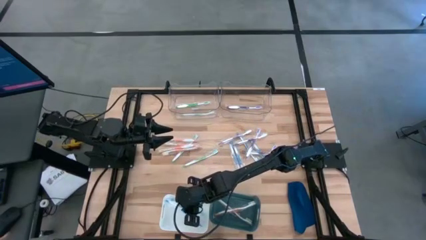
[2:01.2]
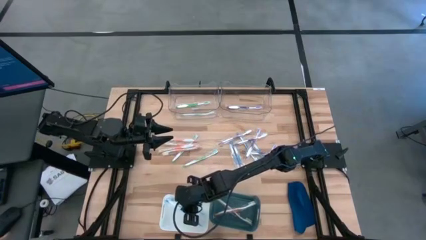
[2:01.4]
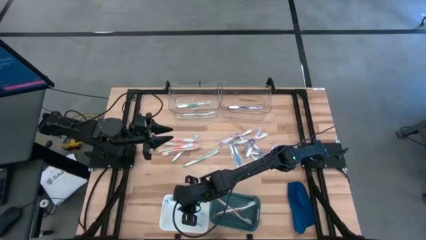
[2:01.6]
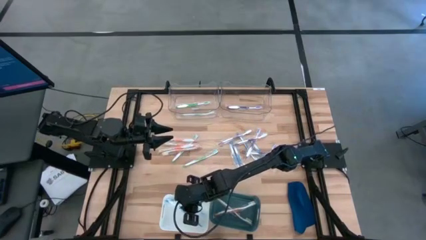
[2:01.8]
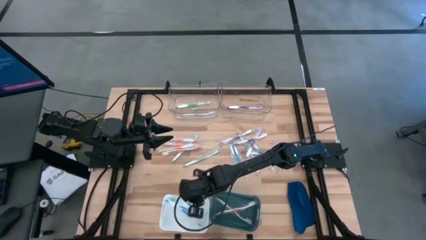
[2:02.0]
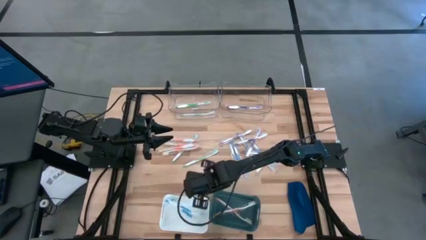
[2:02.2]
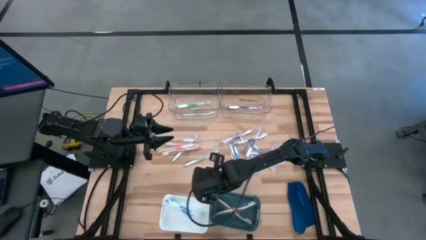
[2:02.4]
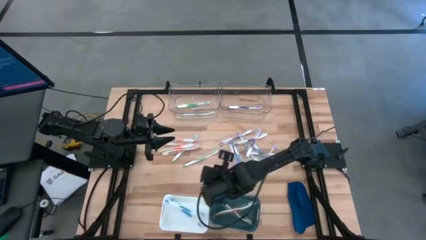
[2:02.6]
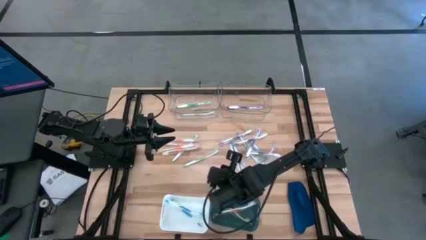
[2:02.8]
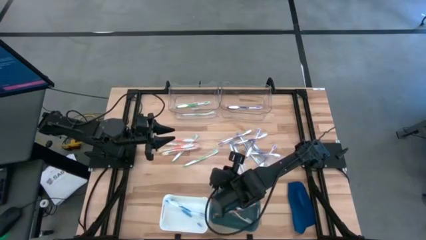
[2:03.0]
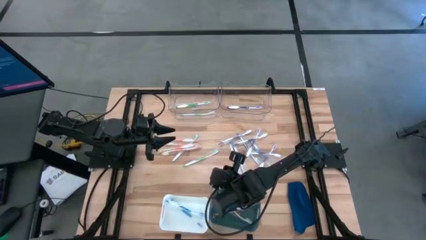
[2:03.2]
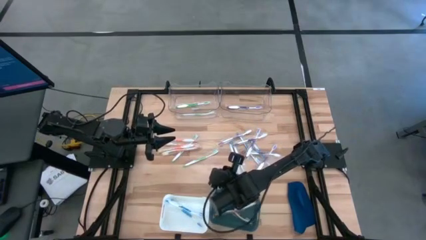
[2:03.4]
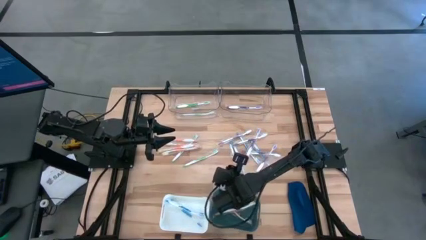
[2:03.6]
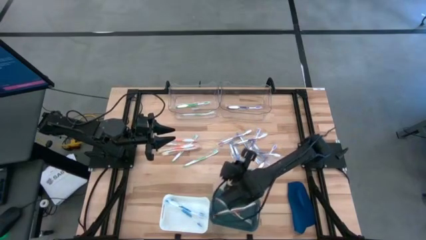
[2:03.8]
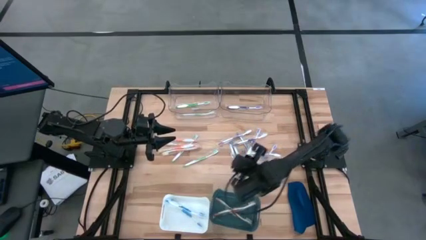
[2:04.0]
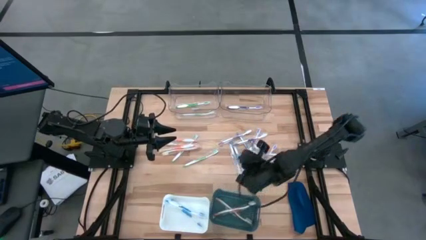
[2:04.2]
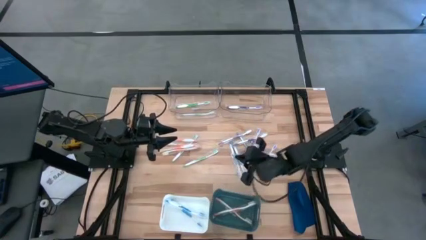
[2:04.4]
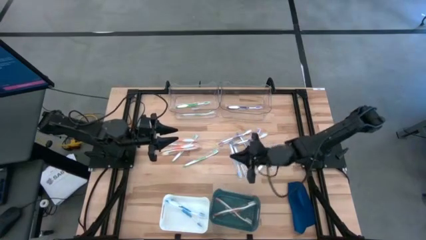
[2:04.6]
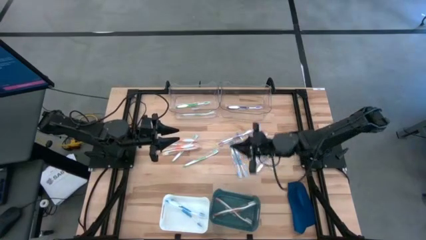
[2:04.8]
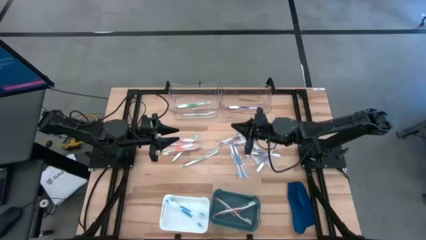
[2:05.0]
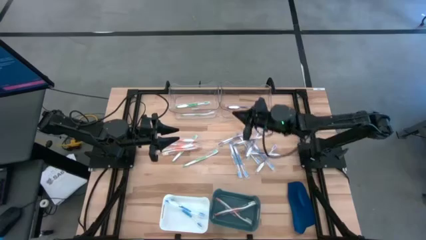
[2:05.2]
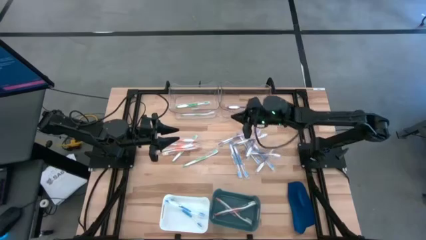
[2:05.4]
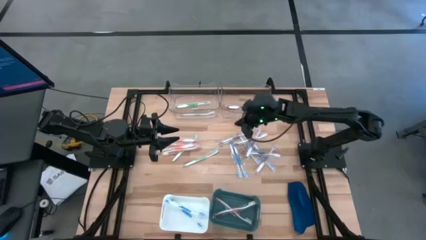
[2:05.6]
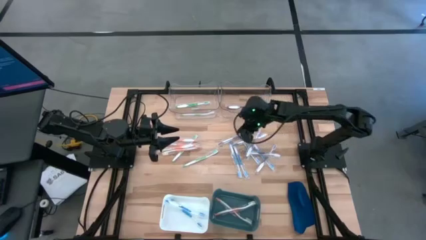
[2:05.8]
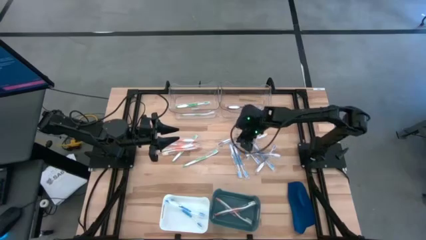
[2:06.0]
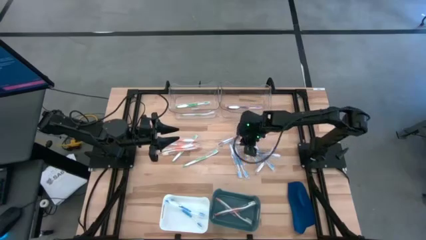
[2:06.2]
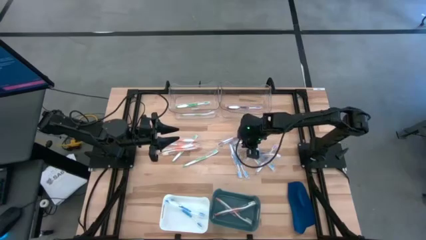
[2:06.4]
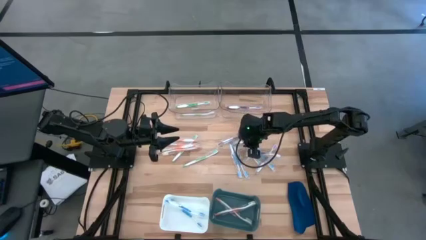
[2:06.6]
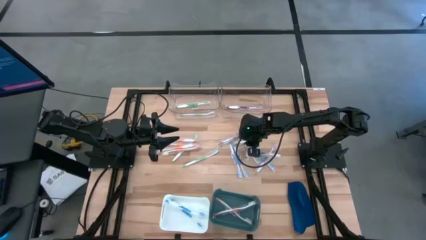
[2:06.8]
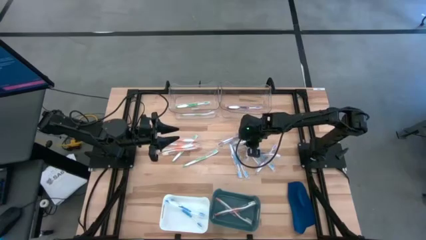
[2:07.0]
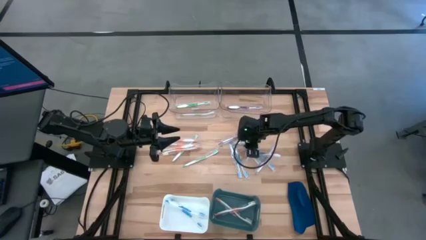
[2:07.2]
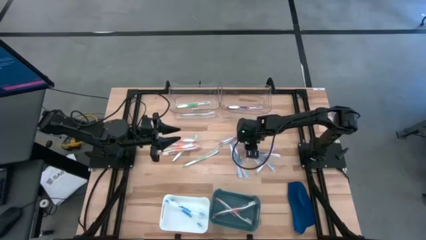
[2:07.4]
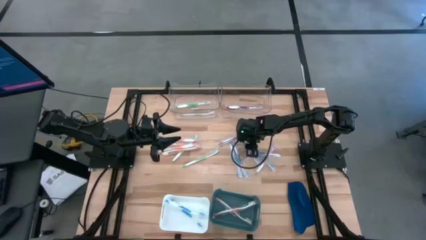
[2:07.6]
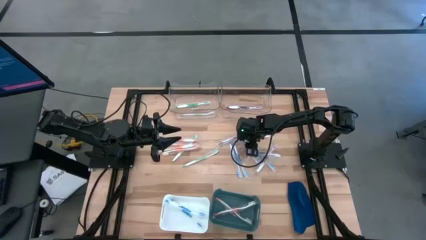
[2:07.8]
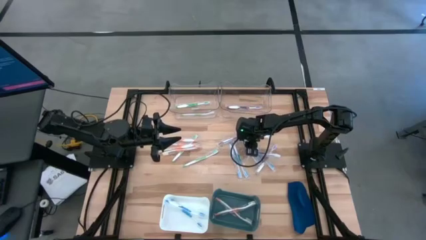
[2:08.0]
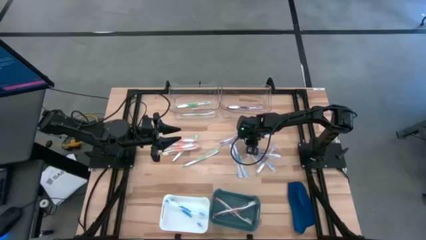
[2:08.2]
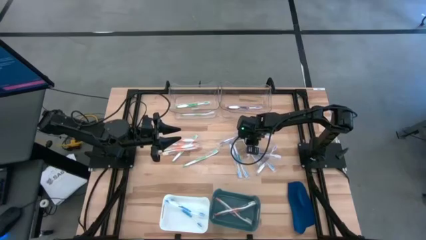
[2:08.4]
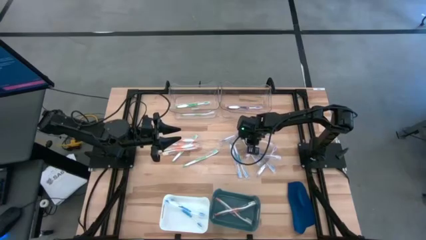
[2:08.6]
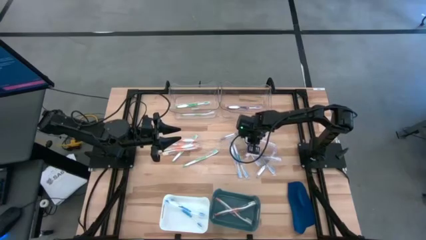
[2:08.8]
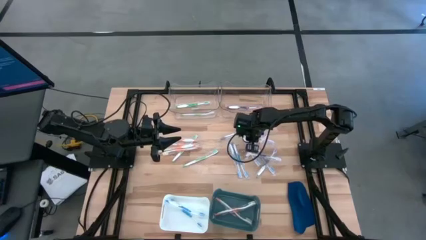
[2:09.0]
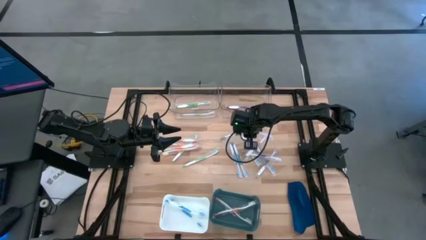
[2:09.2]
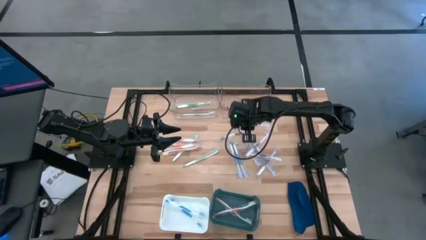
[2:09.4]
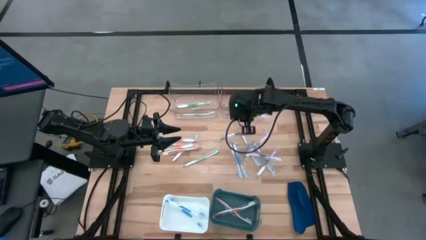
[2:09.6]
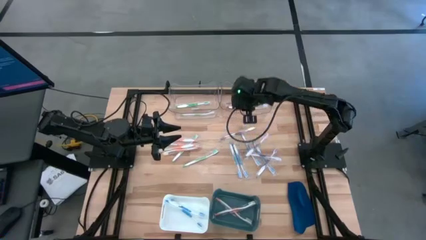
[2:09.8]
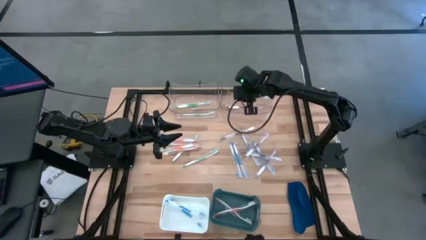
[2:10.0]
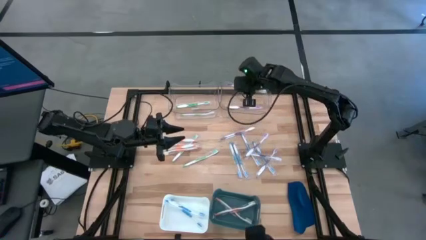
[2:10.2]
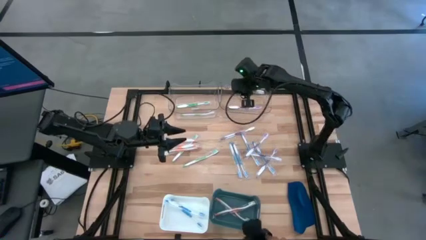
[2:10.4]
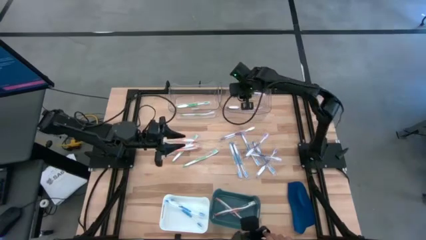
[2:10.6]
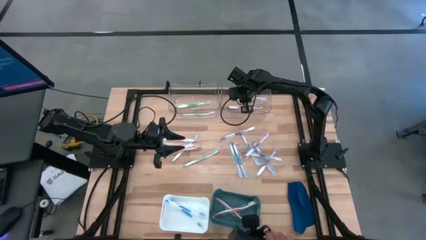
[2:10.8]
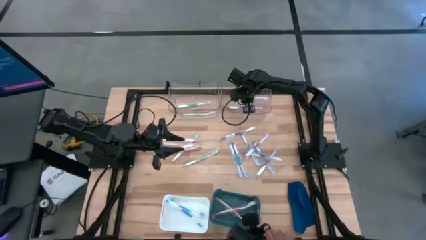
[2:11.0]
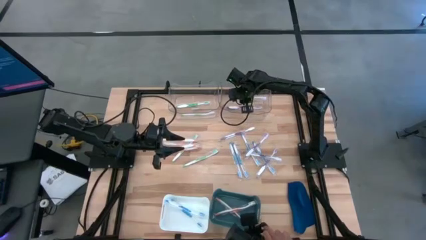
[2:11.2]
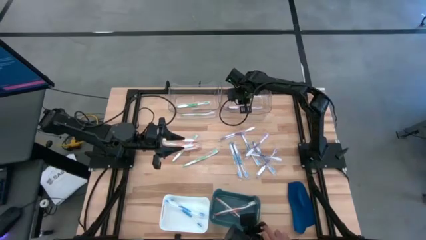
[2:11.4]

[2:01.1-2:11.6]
Task: Pick & Place Toothbrushes
Put the purple toothbrush into the right transparent bin

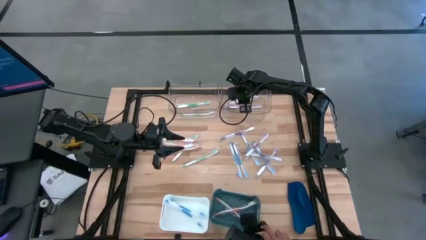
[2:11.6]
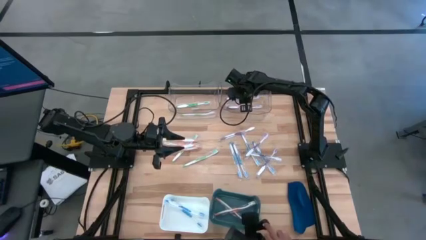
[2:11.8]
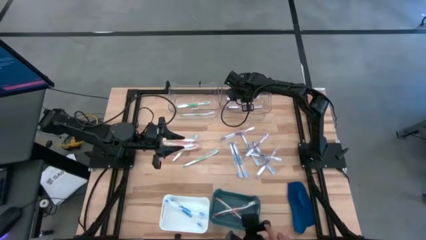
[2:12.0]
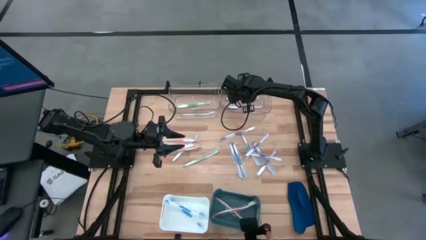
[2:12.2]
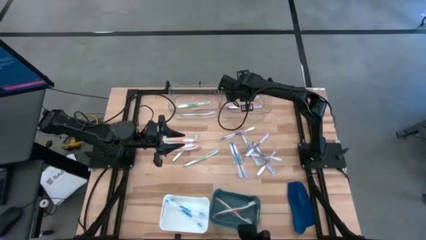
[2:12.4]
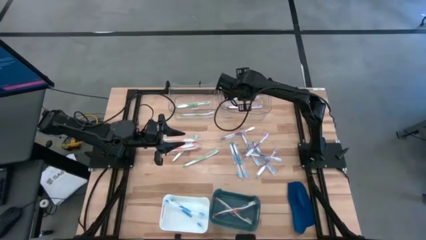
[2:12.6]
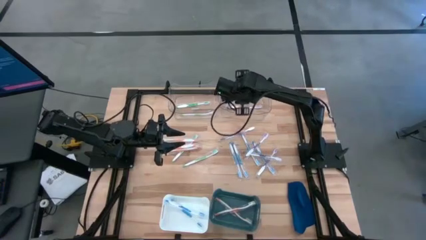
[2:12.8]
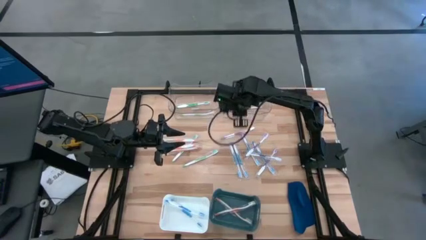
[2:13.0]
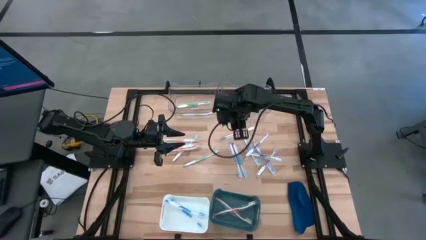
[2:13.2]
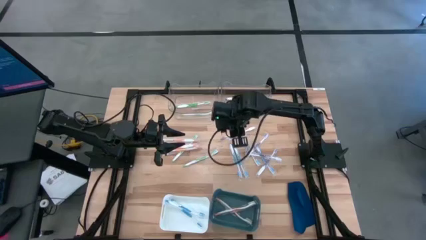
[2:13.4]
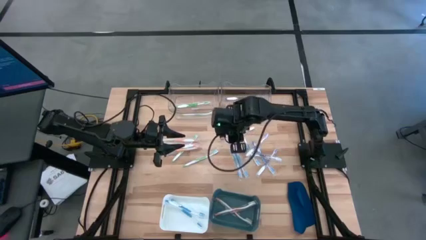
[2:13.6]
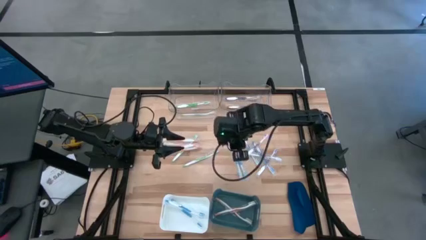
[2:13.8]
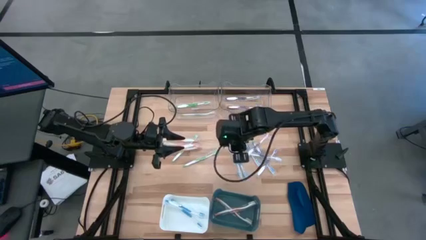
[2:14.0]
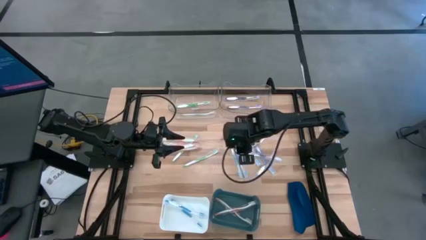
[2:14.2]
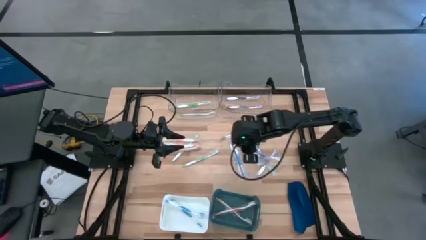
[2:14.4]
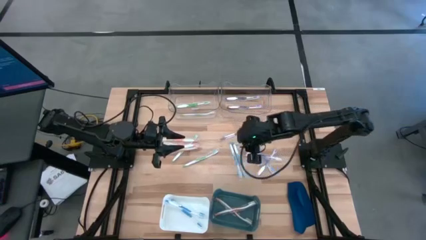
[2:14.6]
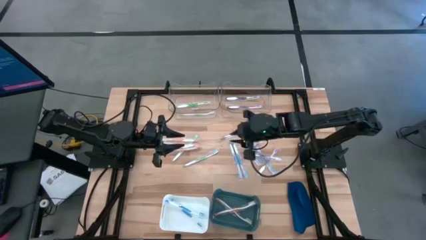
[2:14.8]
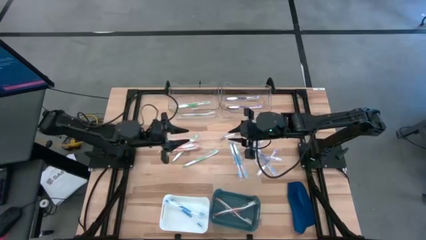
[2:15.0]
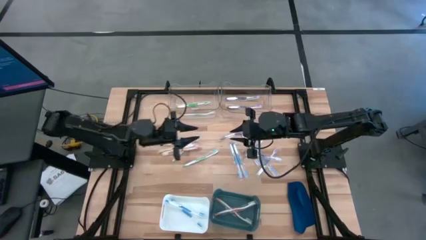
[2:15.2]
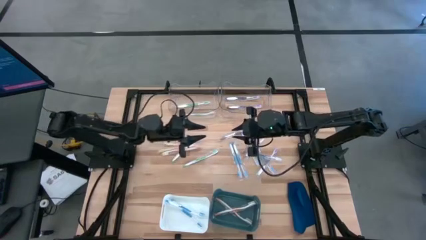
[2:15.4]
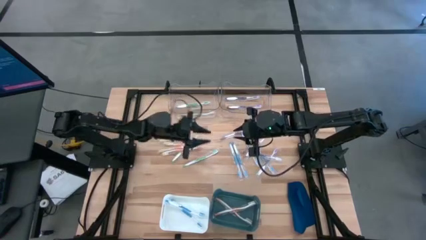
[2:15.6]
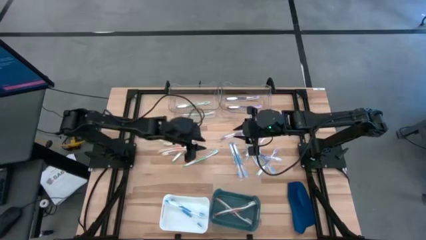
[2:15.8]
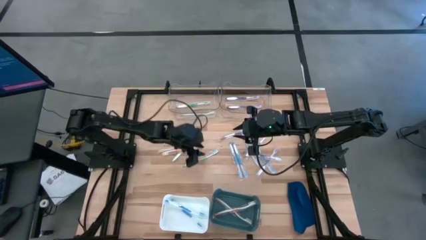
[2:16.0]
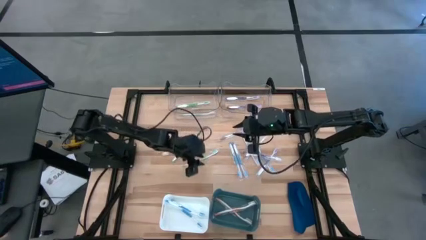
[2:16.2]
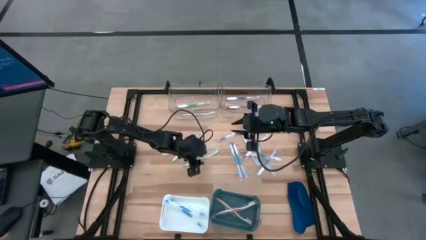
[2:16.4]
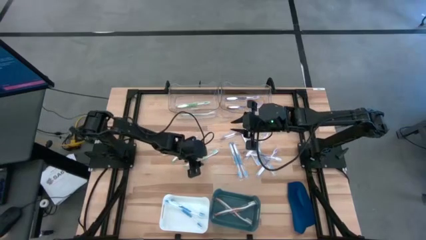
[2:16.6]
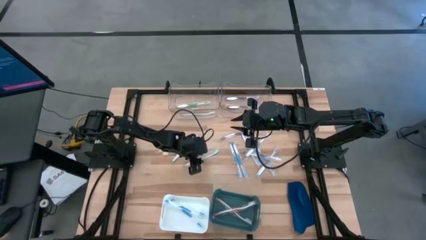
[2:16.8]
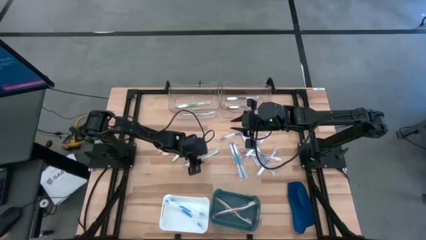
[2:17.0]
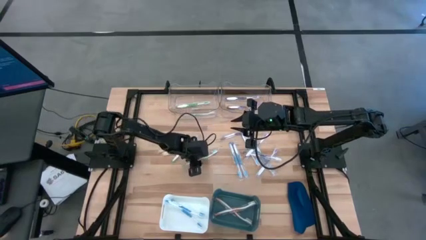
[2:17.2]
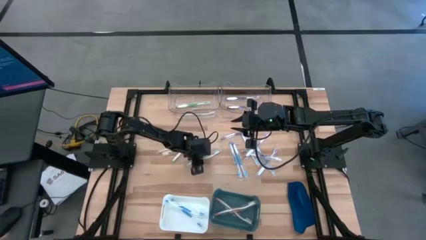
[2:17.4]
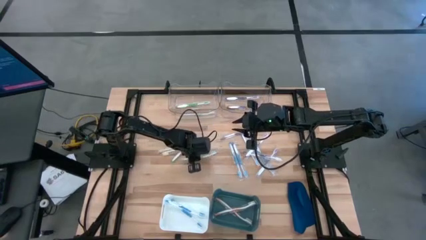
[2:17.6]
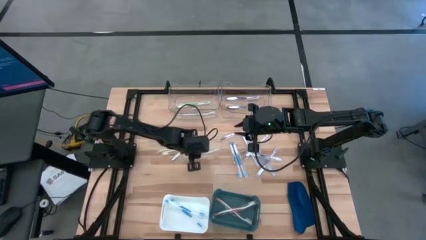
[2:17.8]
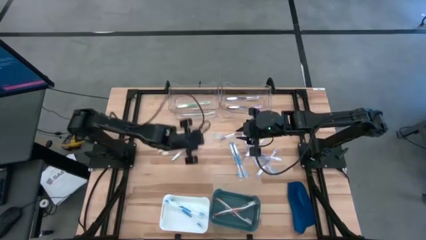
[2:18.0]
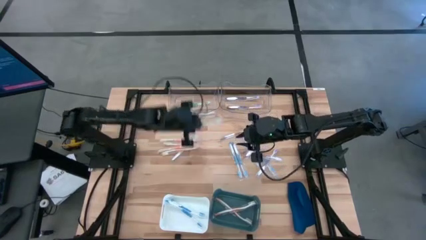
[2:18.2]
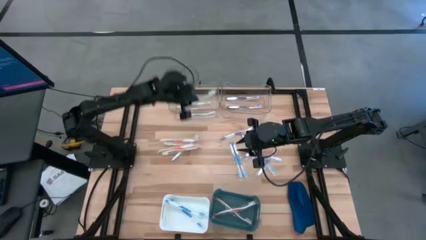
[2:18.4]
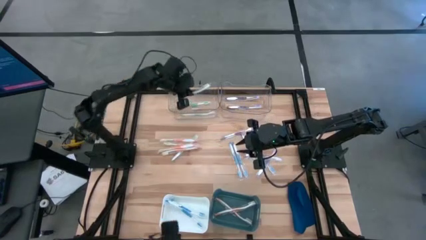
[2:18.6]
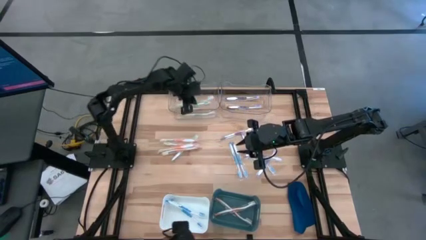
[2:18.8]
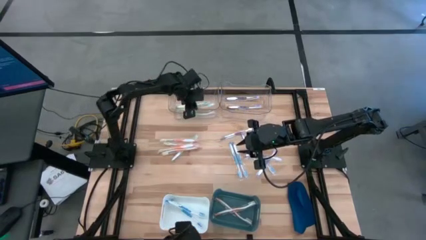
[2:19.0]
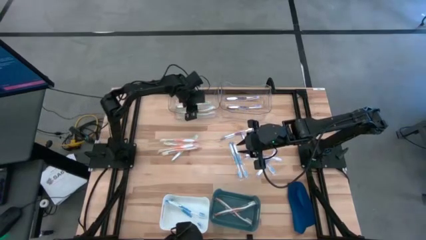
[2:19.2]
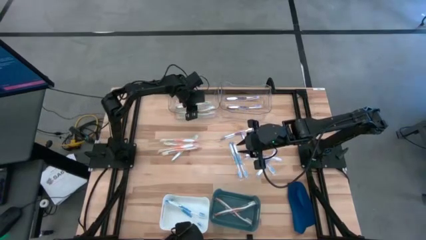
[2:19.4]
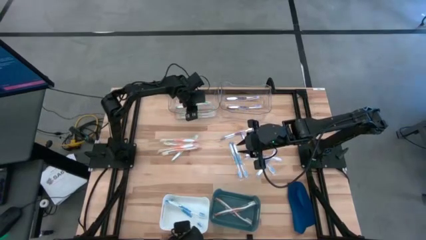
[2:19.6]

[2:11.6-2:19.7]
Put the green toothbrush into the left transparent bin
